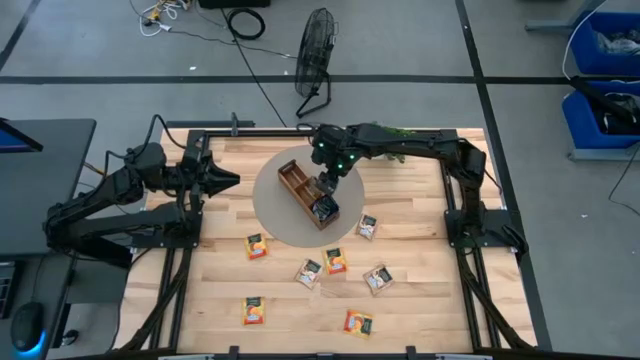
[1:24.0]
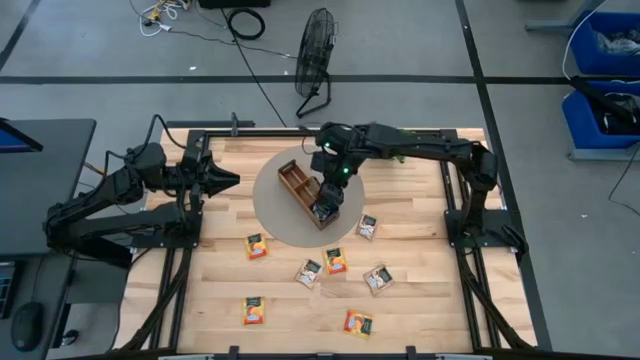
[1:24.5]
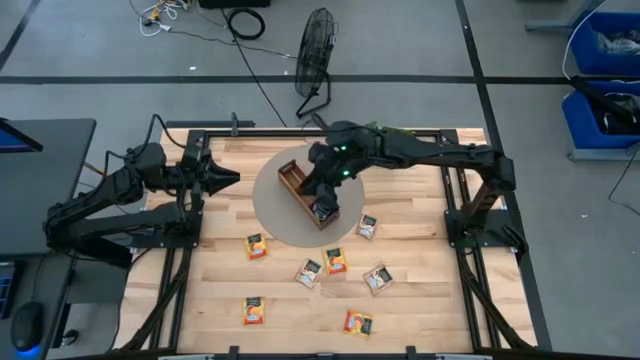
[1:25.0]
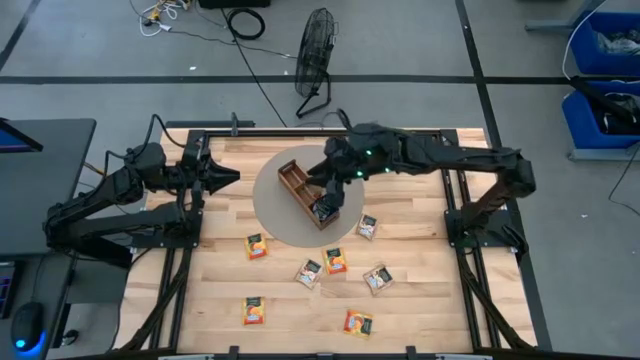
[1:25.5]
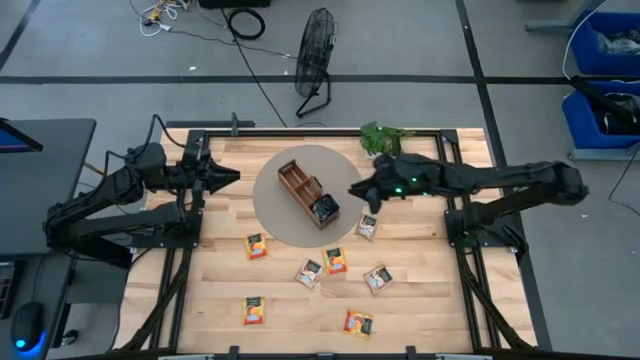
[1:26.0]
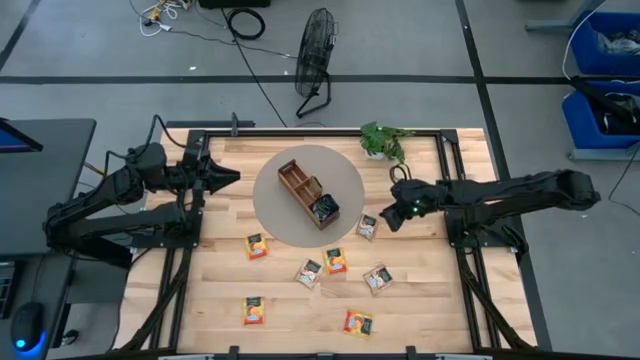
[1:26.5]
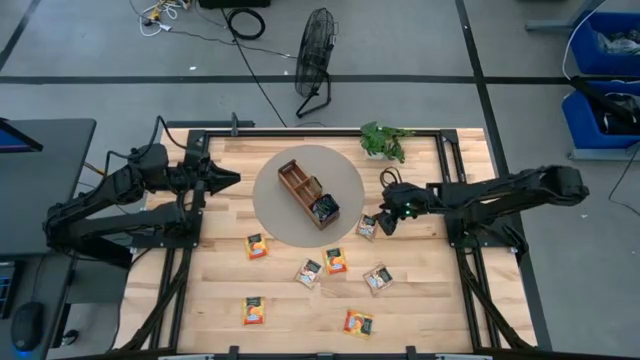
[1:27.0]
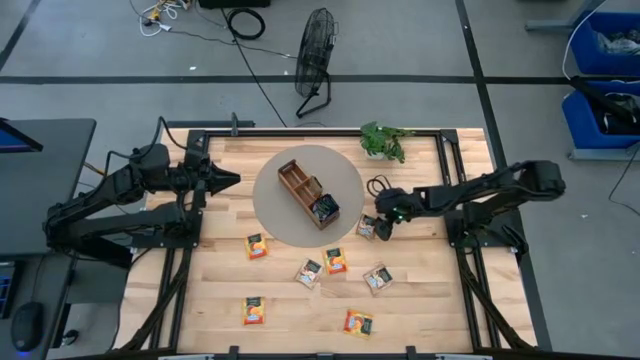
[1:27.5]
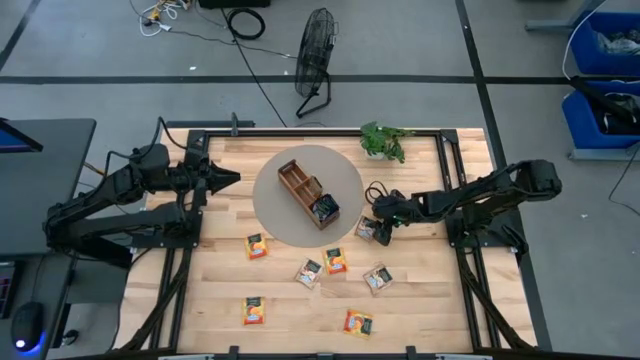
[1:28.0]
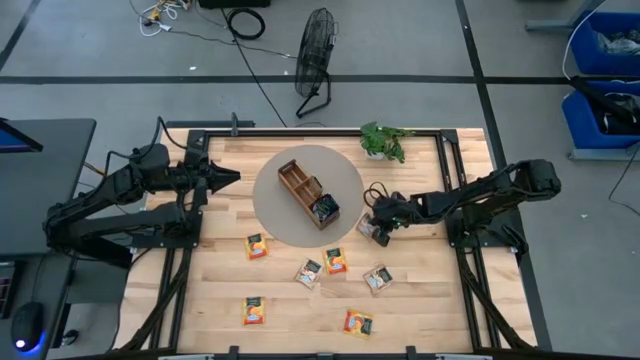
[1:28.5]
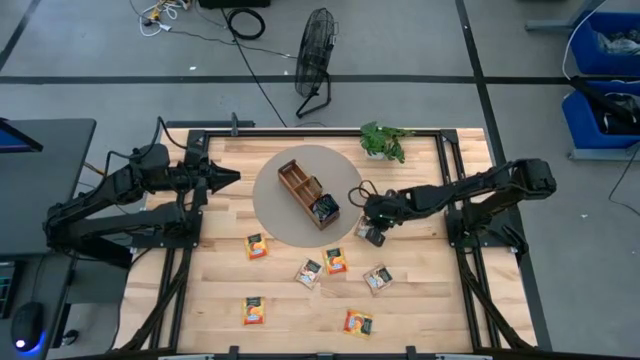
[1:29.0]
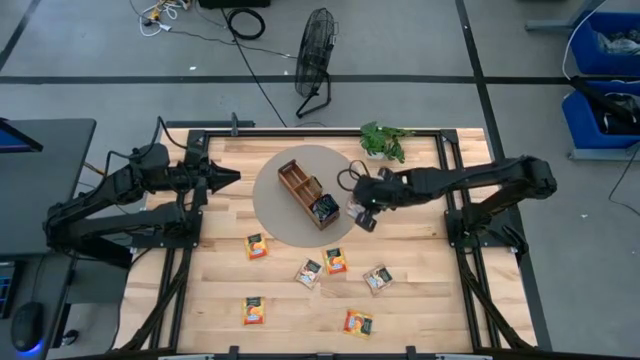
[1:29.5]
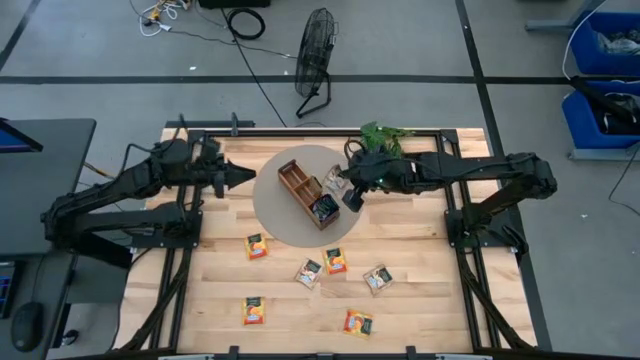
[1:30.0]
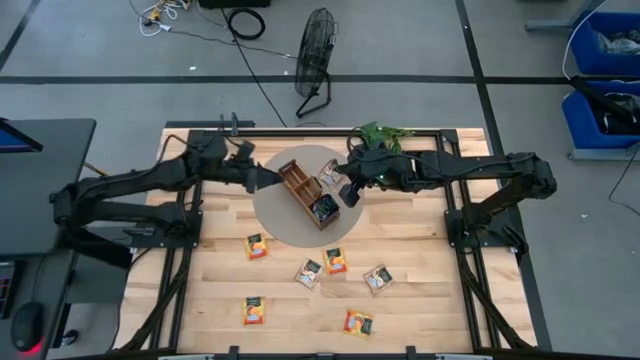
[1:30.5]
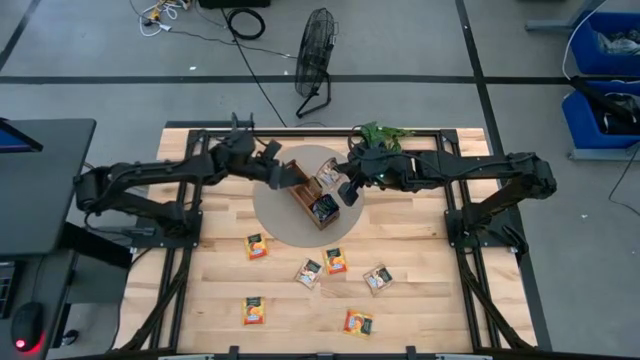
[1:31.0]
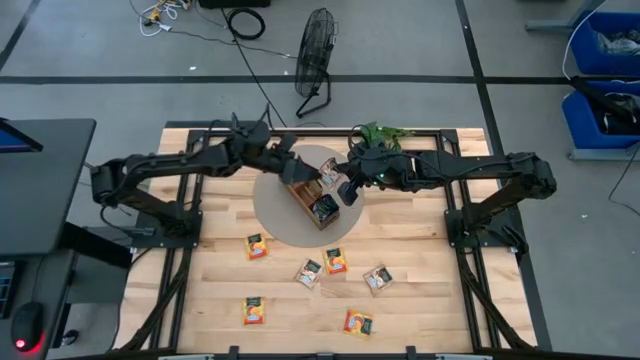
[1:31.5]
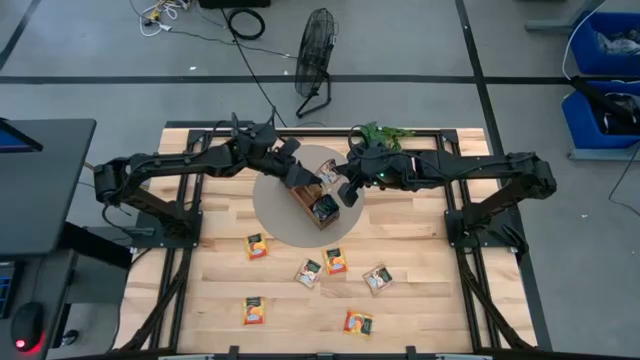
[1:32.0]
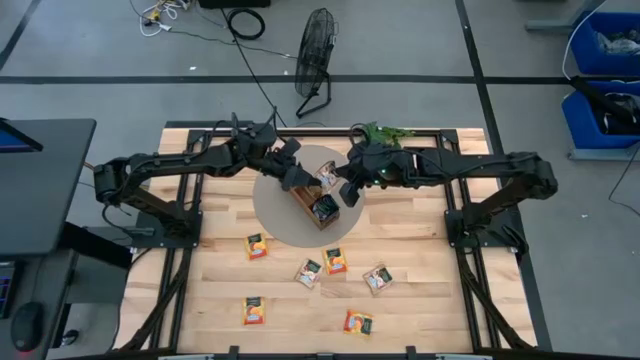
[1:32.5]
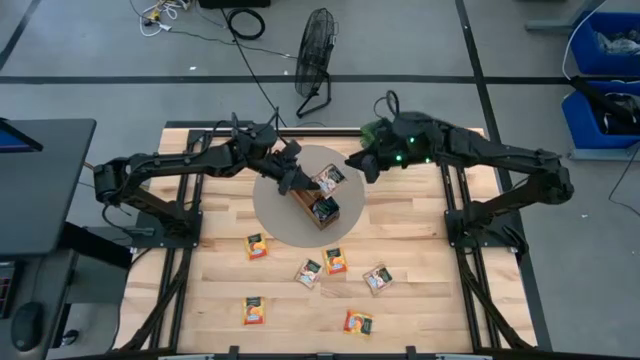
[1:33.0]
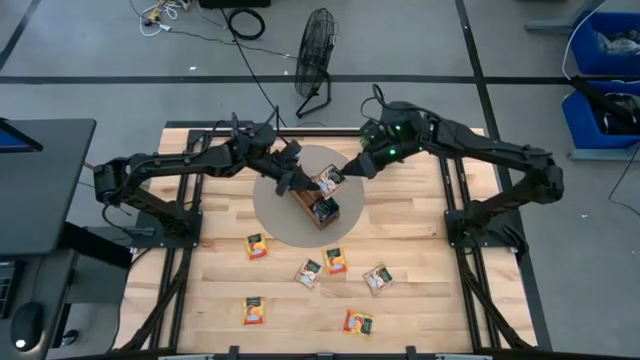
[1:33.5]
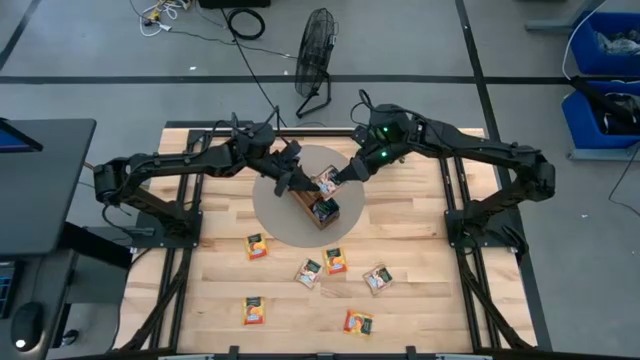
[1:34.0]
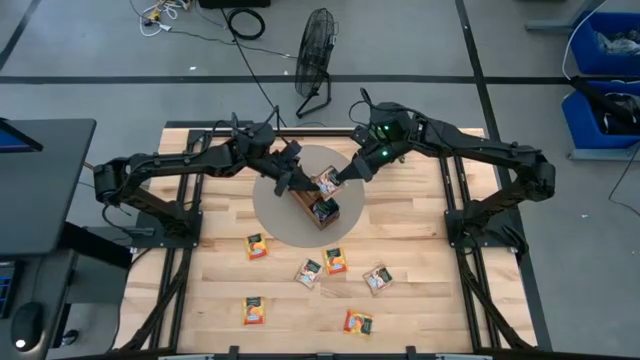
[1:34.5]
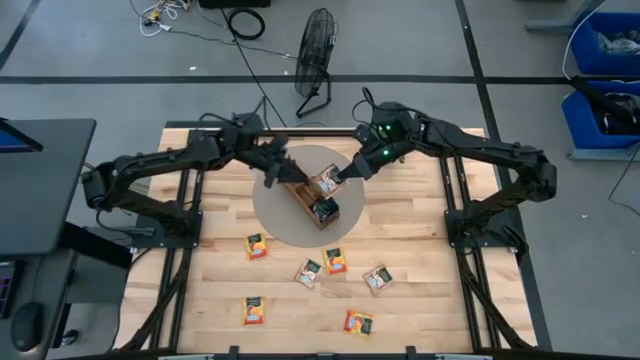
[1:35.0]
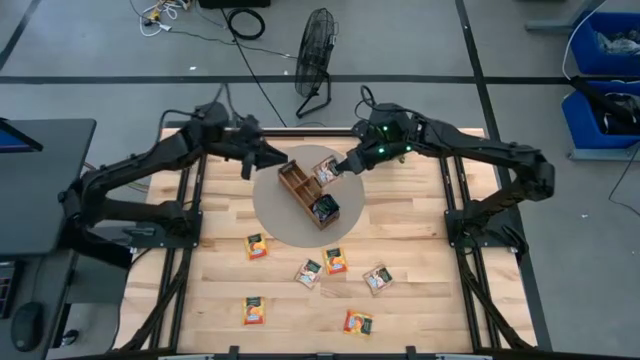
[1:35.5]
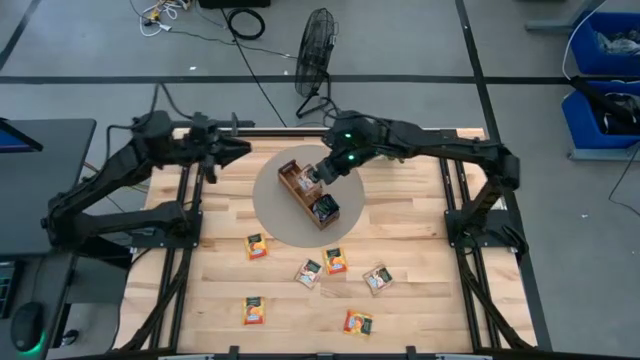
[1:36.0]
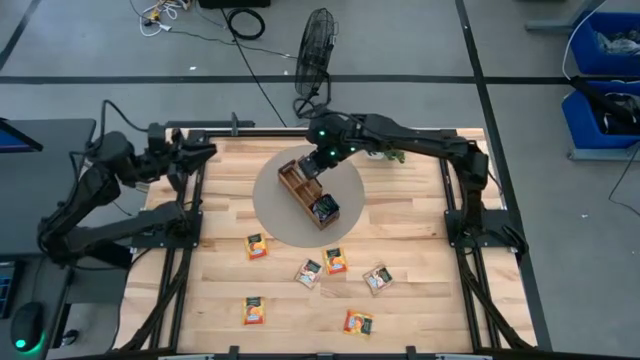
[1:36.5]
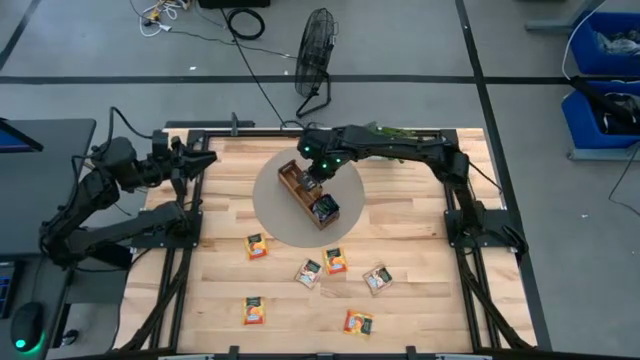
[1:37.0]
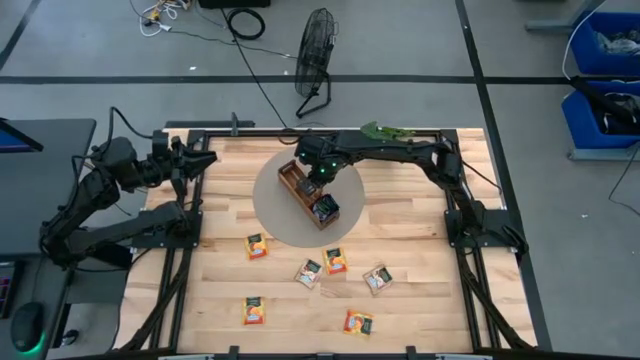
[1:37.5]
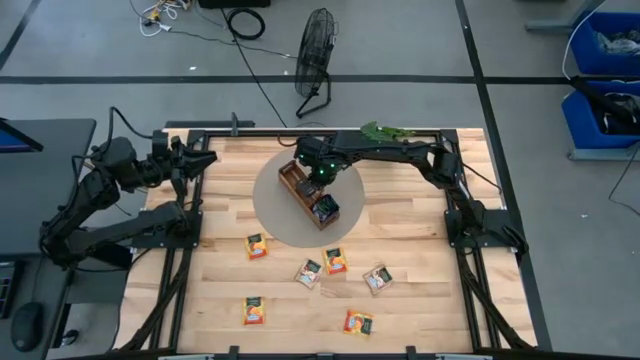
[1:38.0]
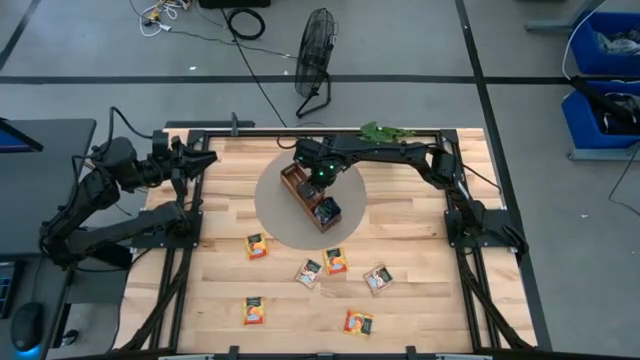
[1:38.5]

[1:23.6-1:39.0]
Task: Pick & Place Tea
Put the brown tea bag into the middle section of the wooden organizer

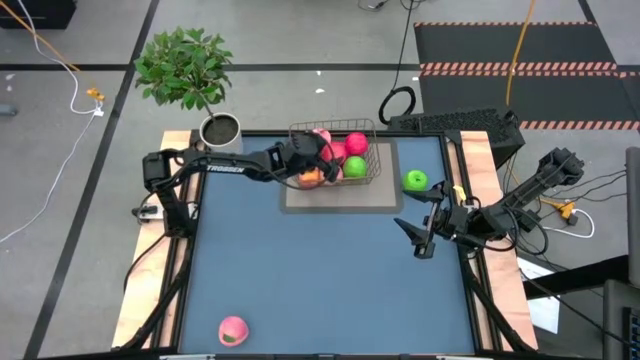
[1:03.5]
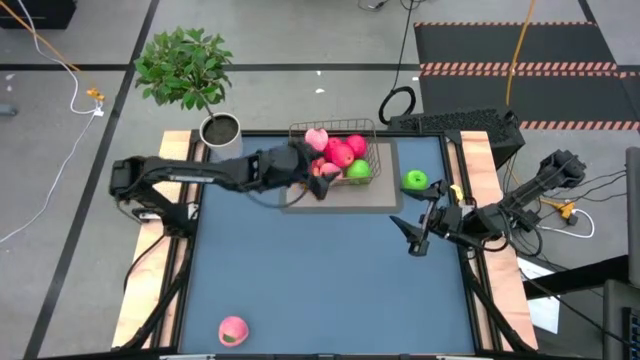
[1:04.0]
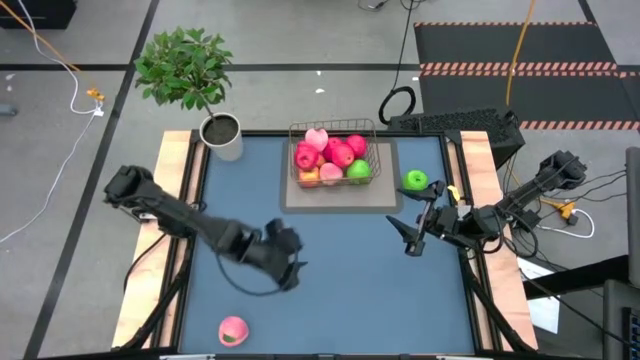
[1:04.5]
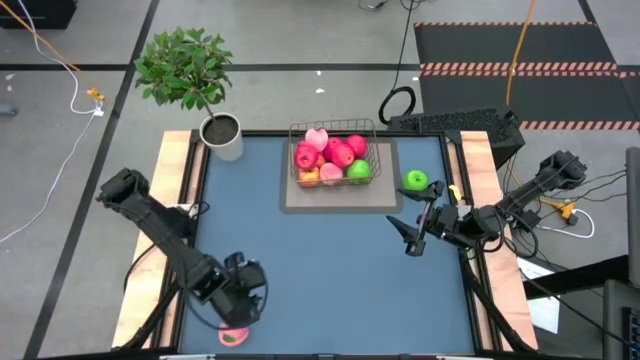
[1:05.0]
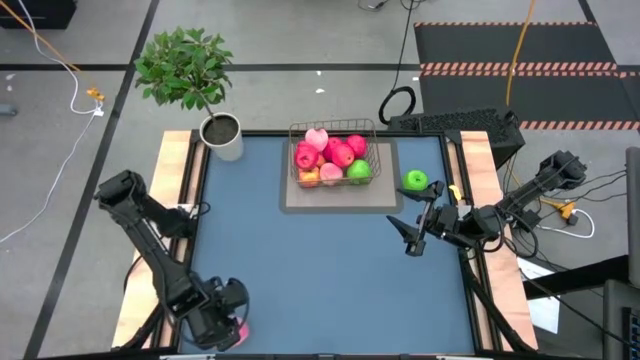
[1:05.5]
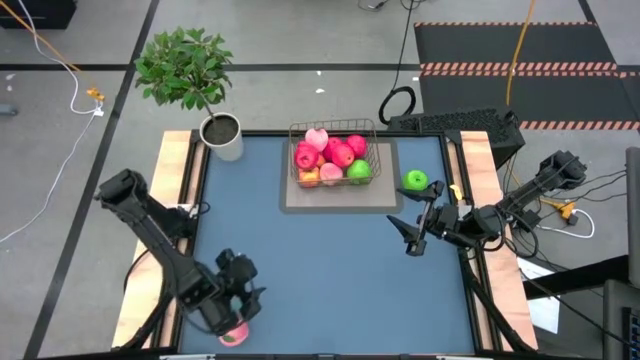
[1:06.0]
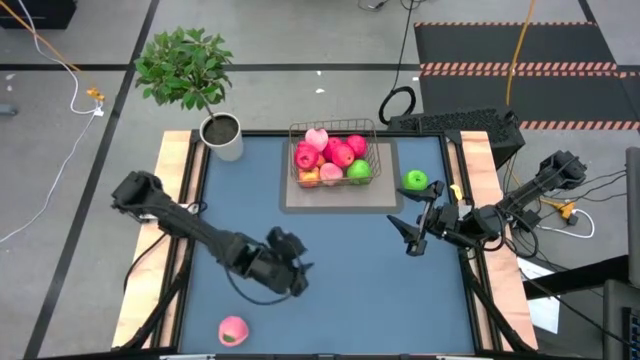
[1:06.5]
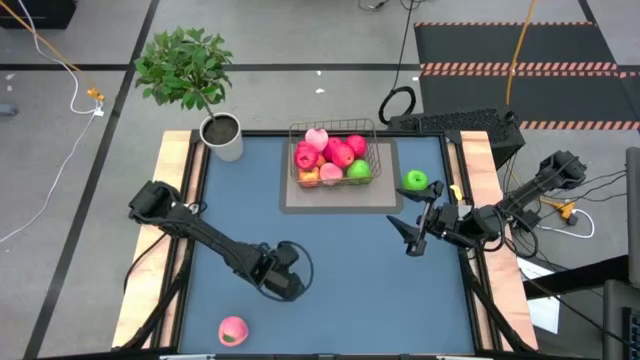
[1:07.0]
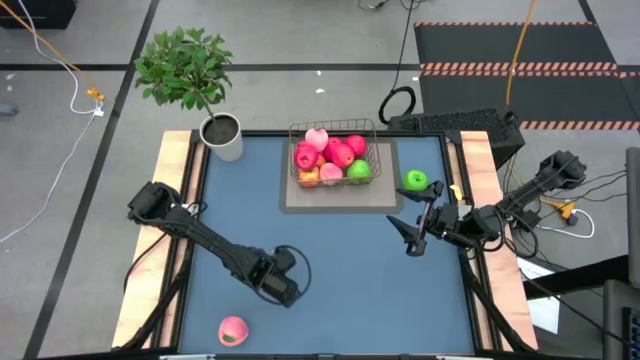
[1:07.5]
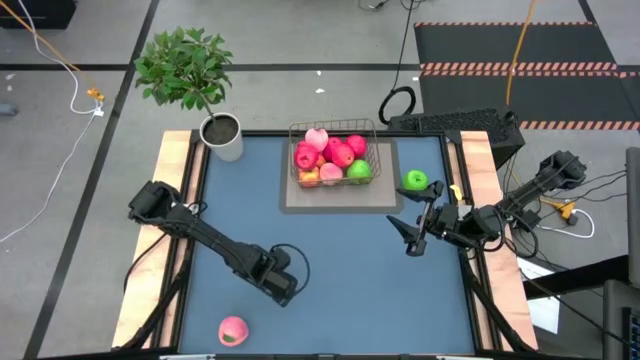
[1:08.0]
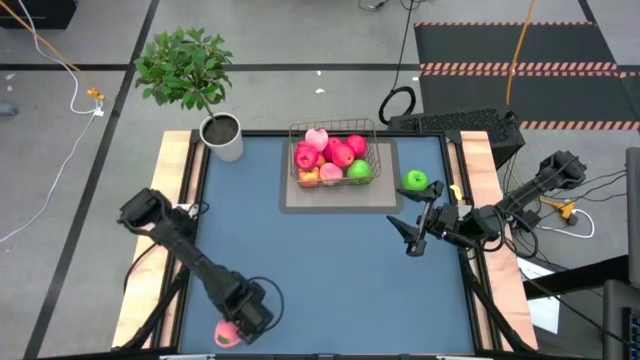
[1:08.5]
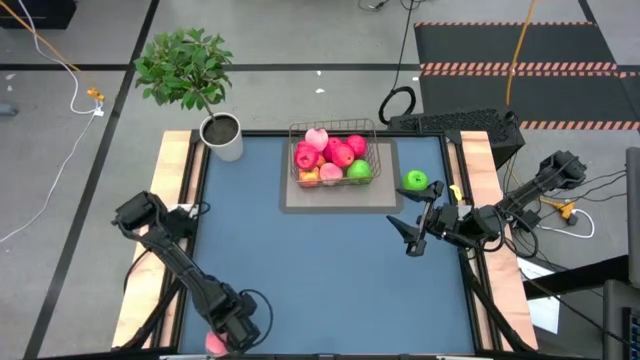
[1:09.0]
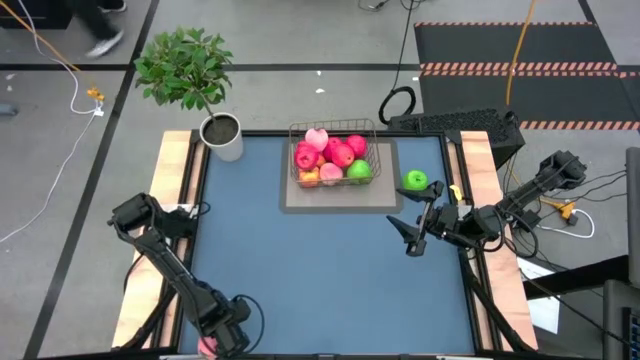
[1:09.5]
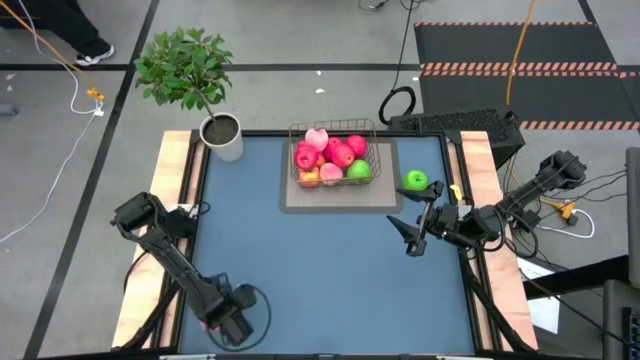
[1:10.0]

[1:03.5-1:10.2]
Task: Build produce basket
Put the pink peach into the wire basket
